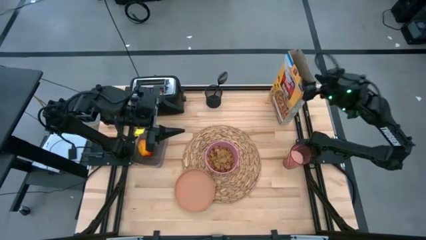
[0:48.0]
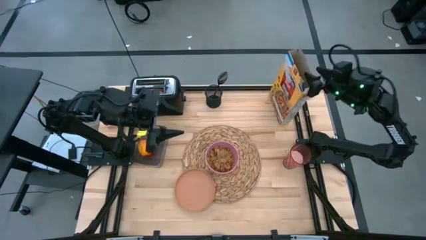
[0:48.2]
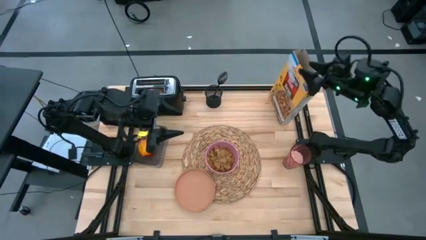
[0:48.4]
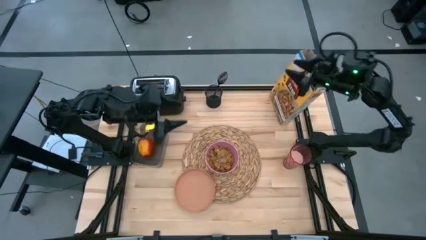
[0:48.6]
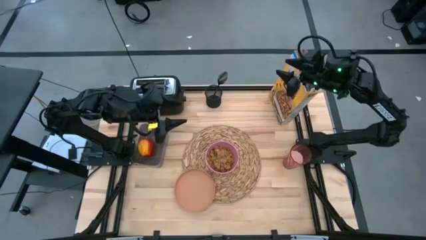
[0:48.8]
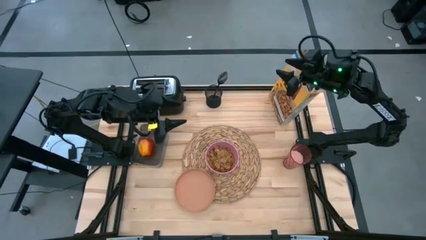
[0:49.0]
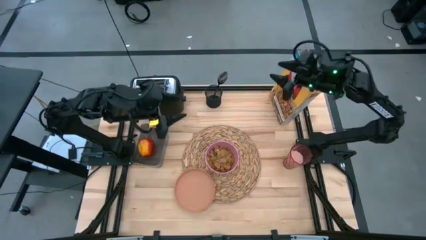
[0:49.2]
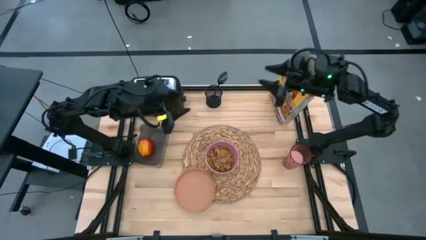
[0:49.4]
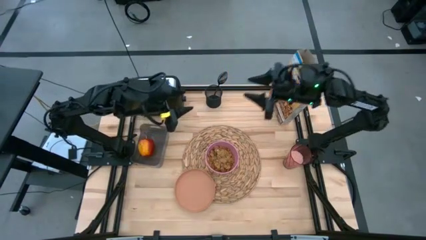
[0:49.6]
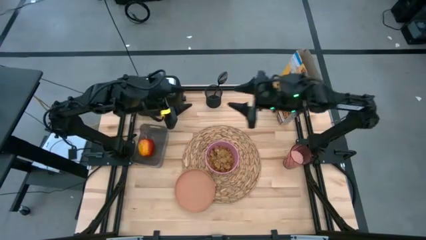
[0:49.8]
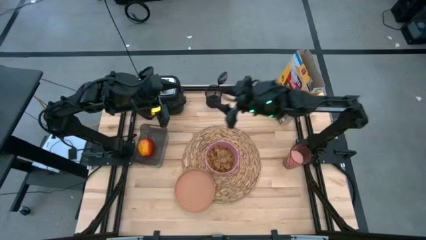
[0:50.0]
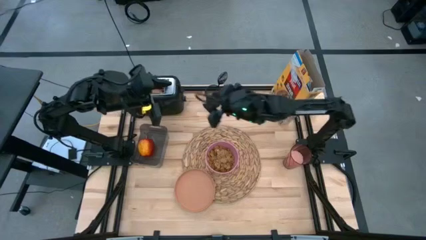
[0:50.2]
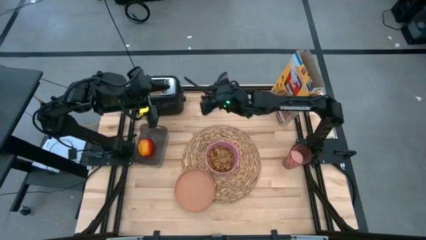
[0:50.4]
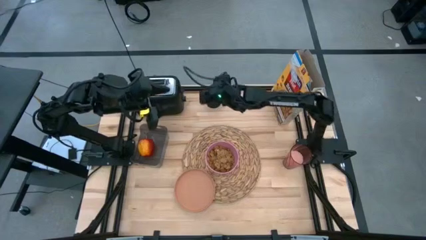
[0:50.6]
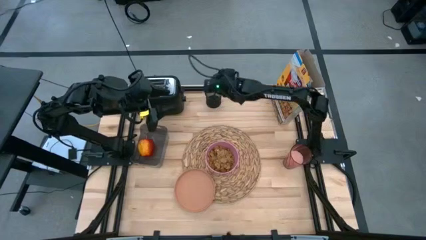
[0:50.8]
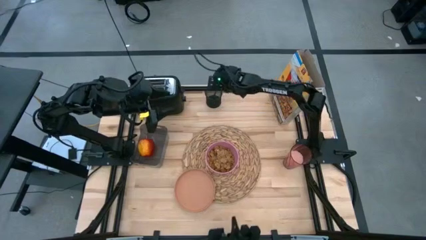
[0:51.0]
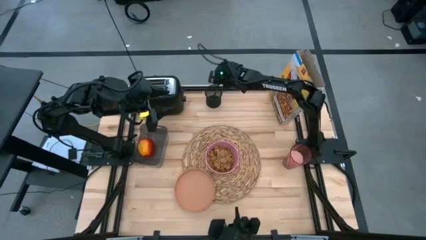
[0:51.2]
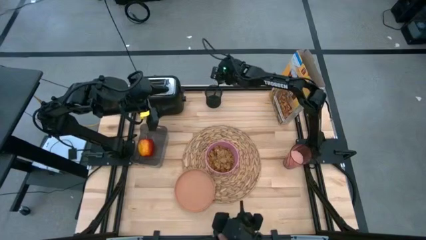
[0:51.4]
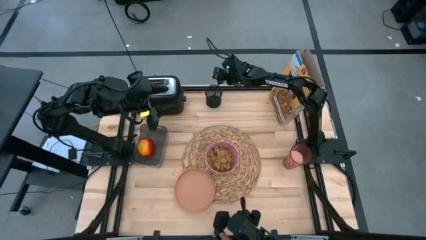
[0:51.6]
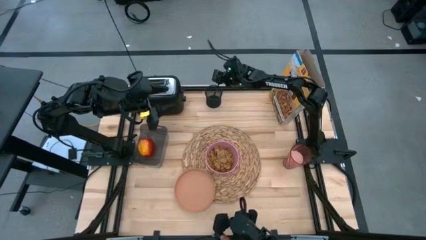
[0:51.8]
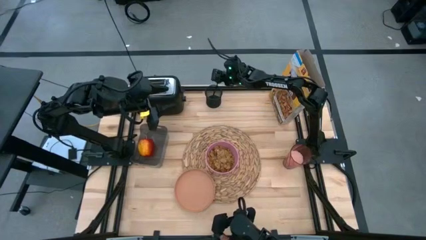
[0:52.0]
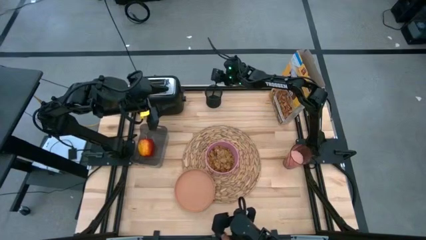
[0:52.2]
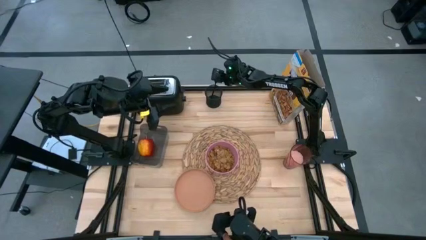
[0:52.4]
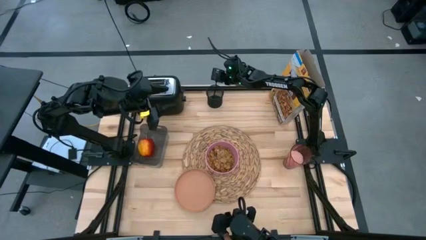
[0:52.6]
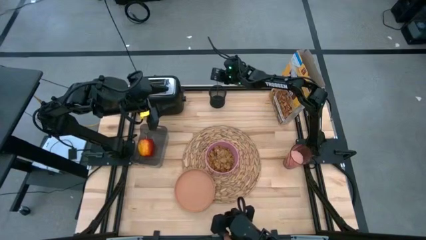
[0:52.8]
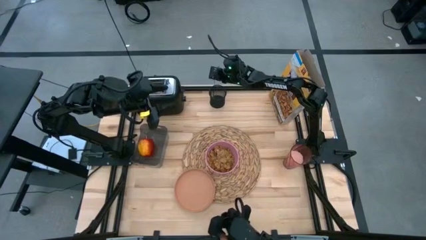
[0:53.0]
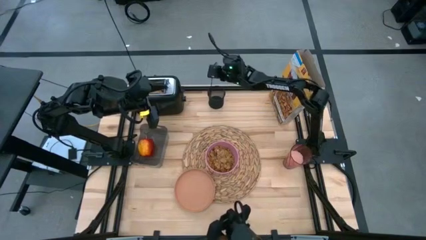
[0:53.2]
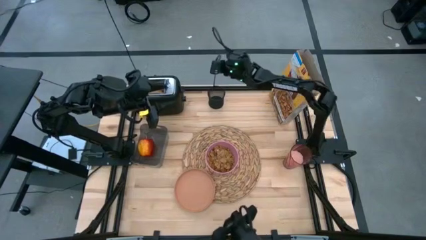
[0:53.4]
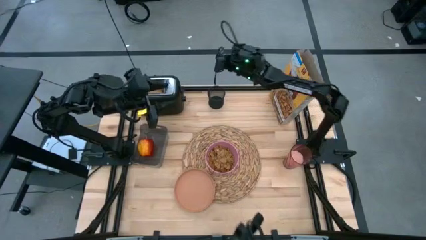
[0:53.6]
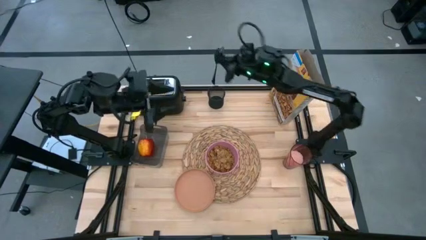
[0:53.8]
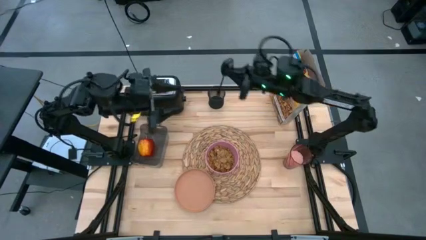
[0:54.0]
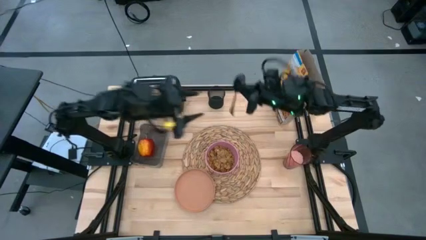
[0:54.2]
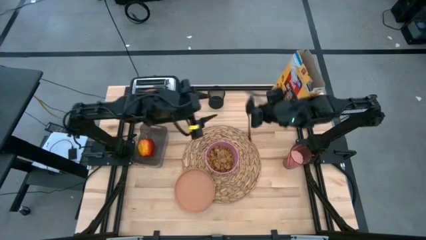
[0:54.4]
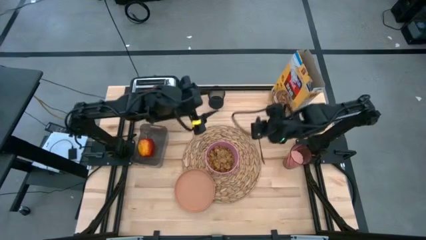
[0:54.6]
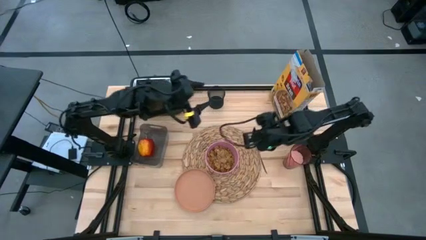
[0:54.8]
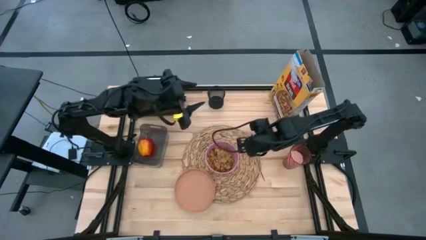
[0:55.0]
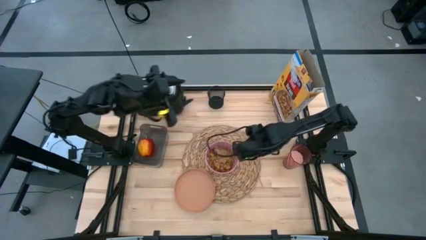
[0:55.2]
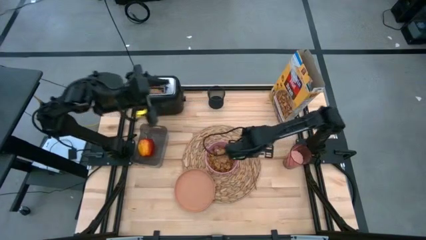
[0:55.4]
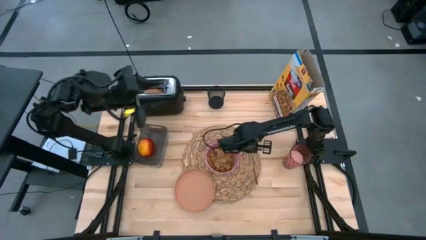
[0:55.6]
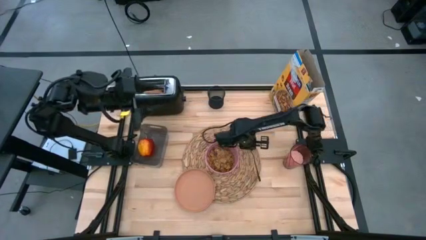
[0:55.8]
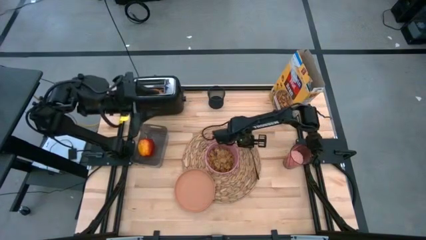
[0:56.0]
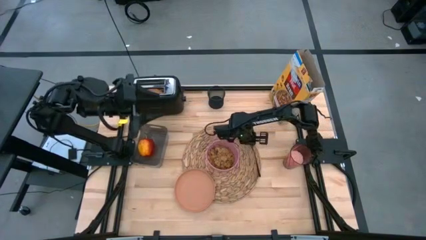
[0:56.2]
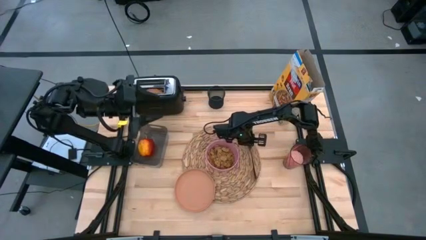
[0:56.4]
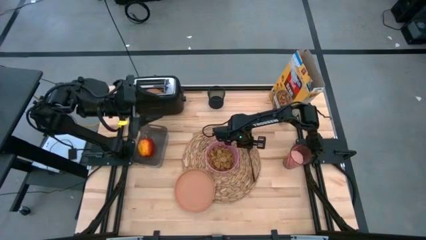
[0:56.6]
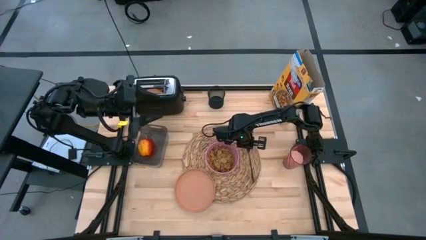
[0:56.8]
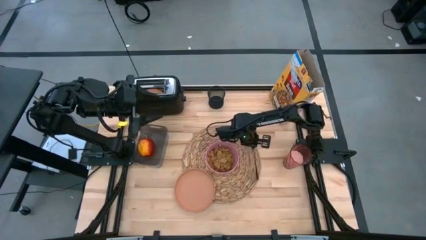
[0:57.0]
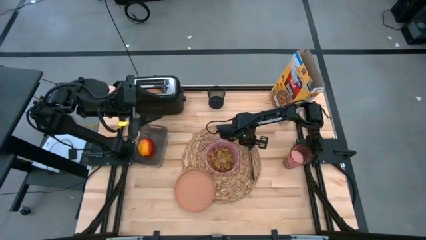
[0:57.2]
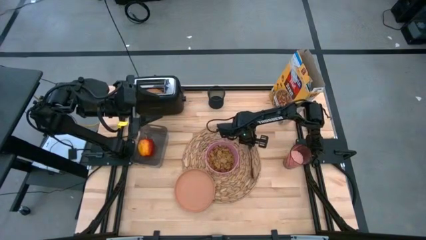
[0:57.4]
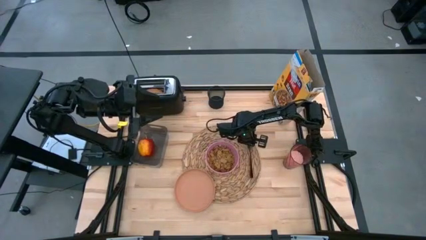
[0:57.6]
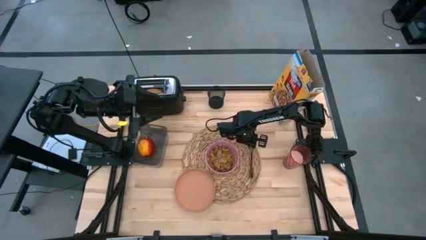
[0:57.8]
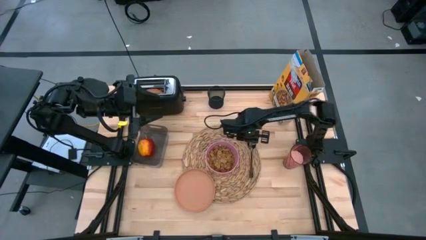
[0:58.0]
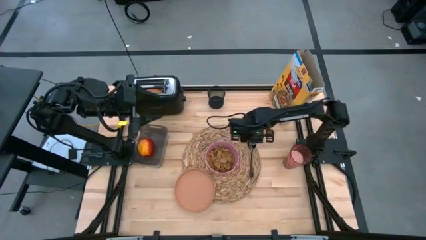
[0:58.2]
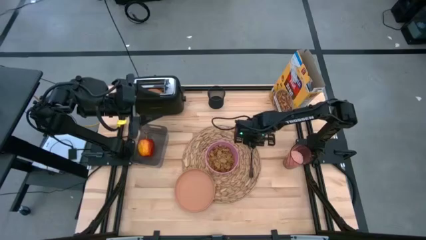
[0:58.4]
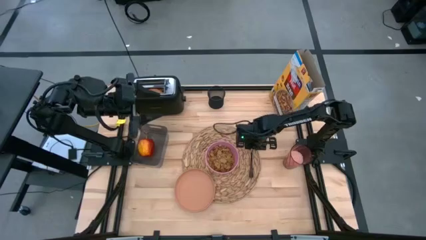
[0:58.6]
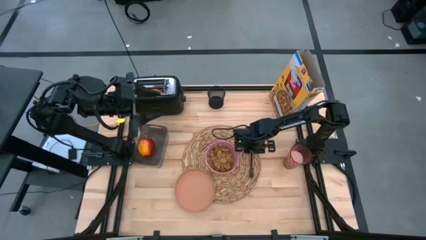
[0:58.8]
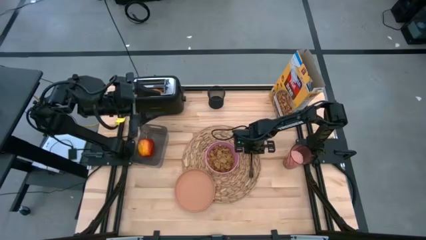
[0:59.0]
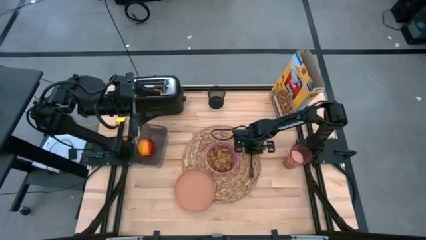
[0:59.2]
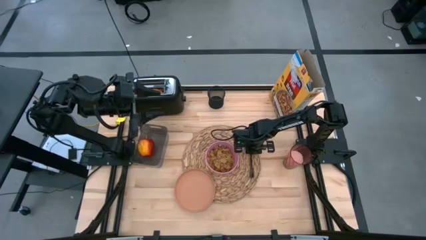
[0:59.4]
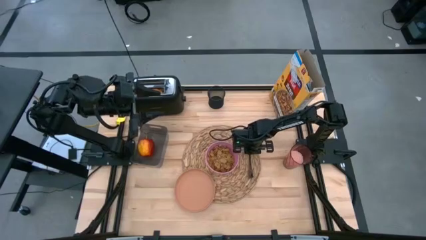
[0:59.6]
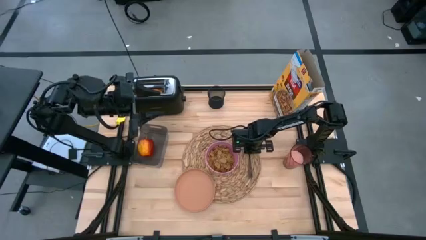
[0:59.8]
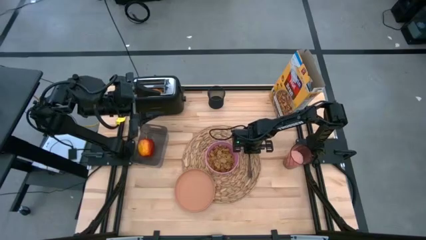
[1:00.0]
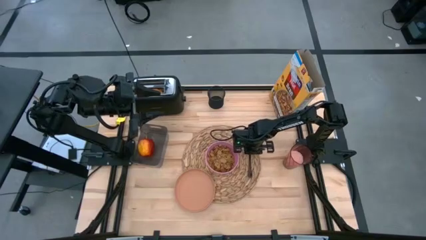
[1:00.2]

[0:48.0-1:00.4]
Task: Arrange a breakfast setting
Put the black spoon to the right of the pink bowl

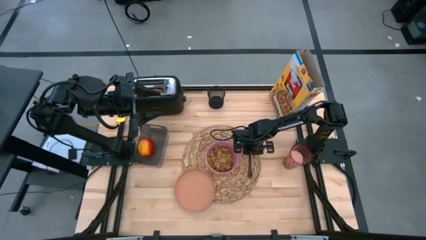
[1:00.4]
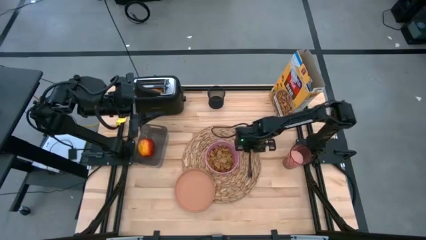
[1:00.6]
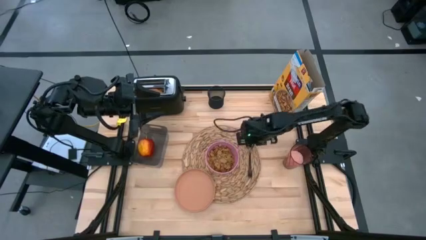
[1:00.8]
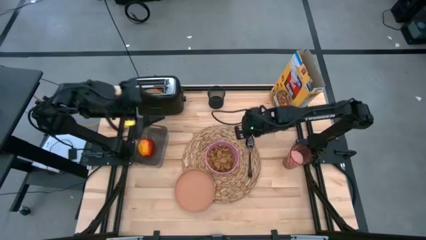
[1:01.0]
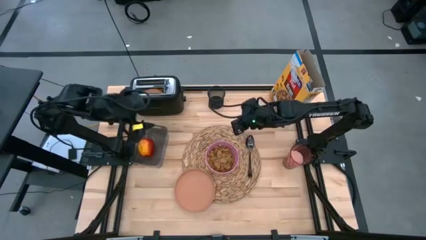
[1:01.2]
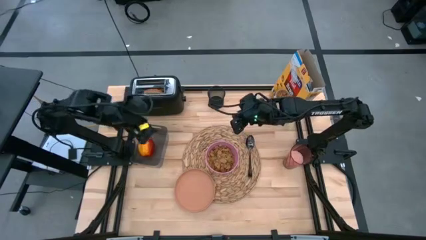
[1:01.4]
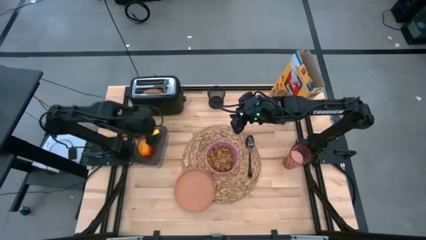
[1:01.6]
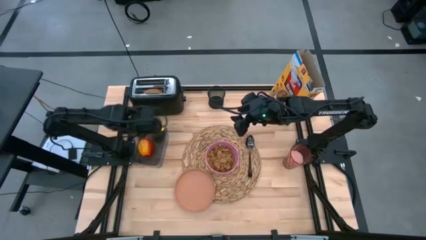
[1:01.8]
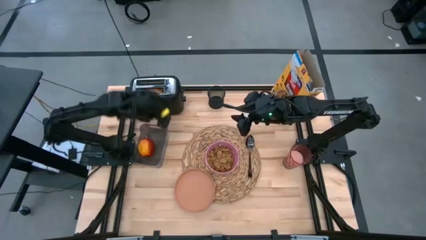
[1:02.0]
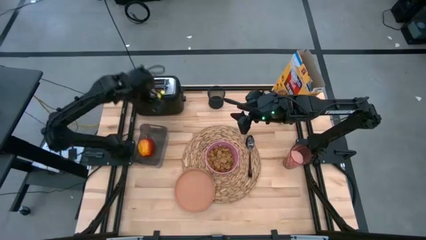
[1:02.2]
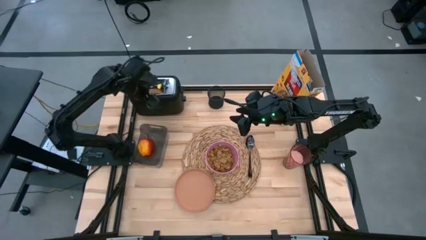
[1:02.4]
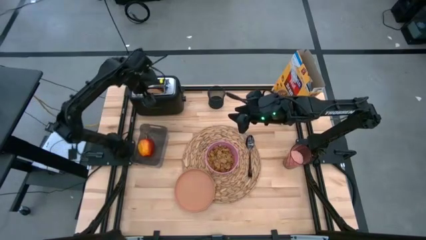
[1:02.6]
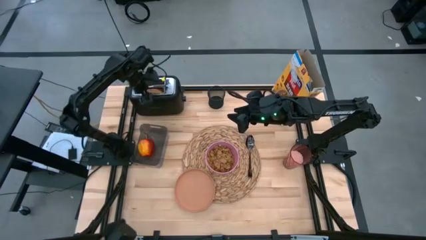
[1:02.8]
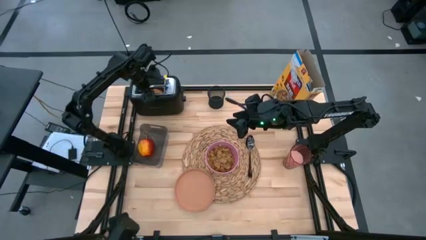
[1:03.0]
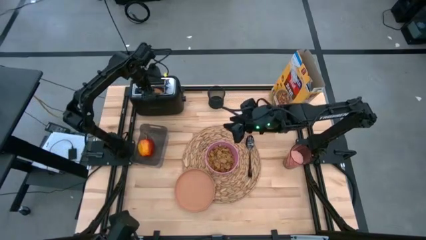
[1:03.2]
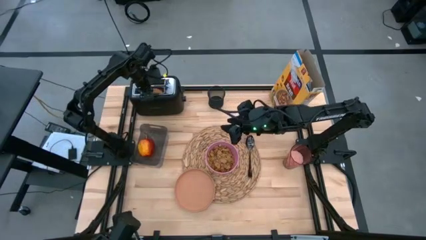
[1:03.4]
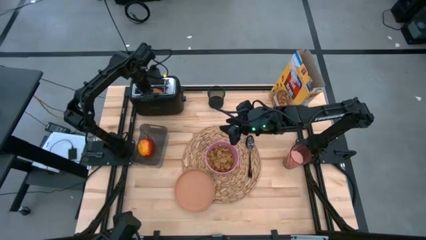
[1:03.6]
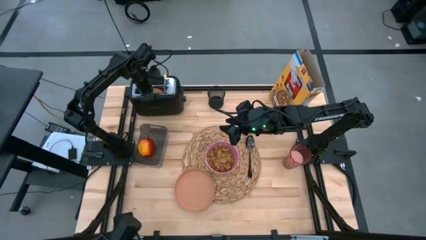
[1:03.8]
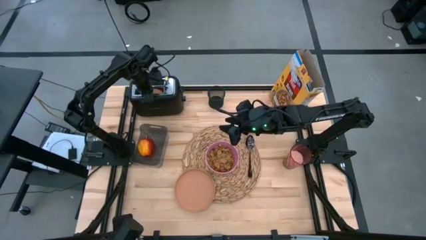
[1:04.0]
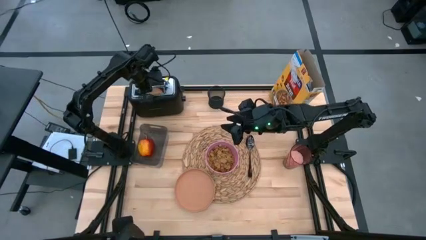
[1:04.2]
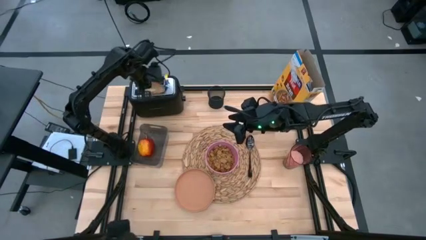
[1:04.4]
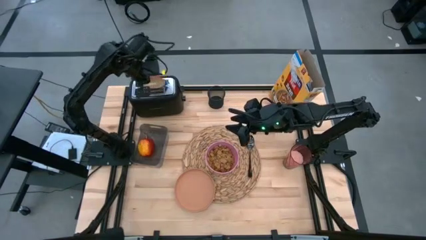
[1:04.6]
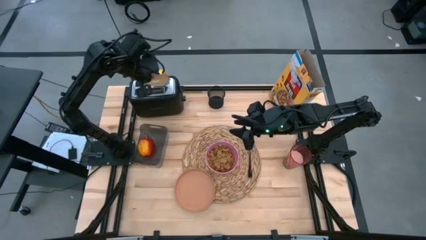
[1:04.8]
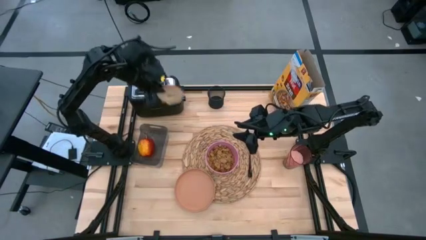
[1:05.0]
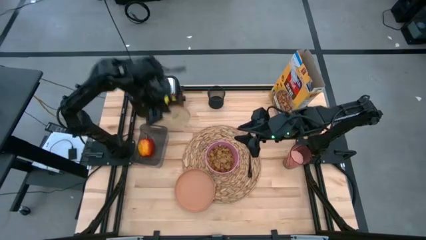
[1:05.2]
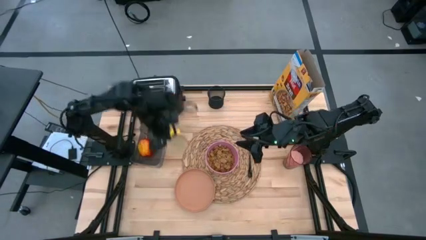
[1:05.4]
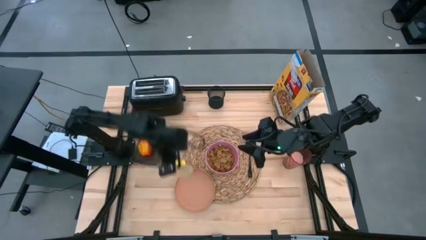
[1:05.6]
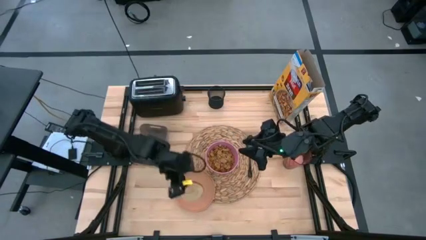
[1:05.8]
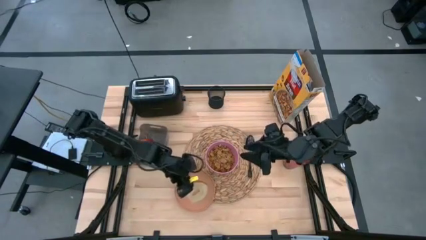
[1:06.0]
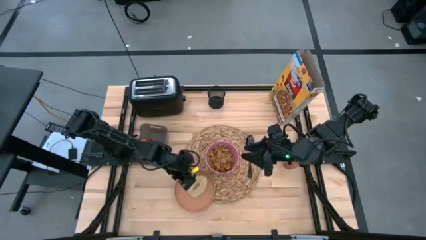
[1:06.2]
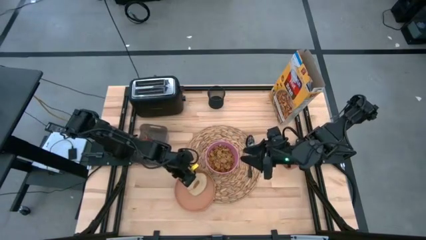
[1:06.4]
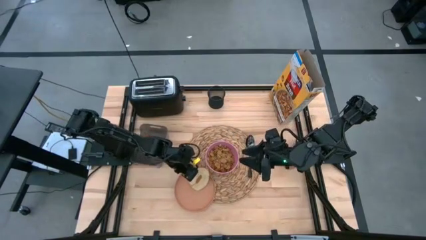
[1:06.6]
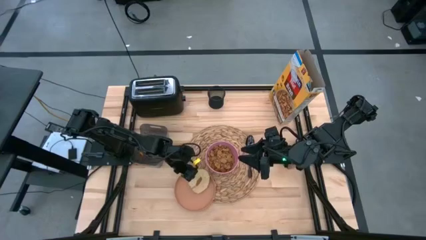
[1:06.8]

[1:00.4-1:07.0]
Put the brown bread on the orange plate
